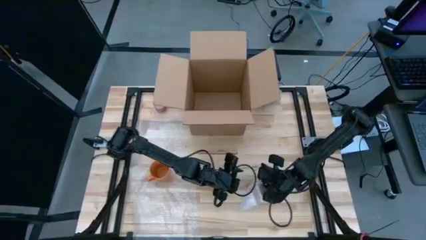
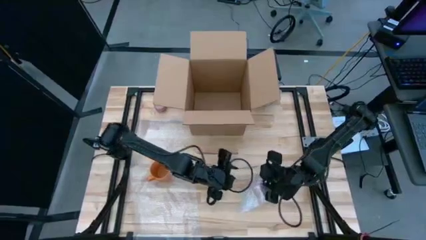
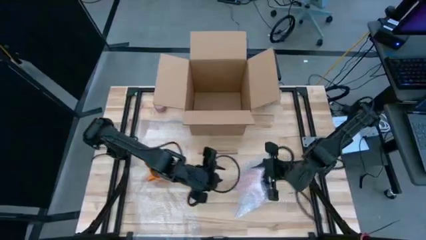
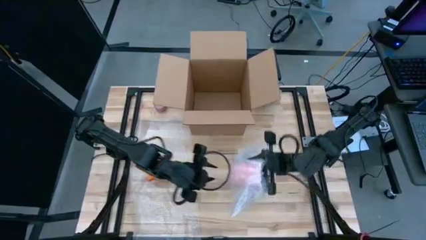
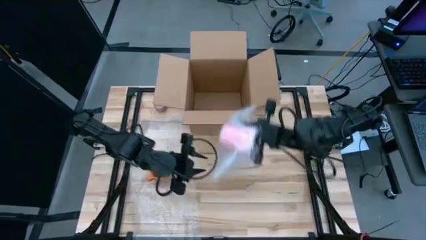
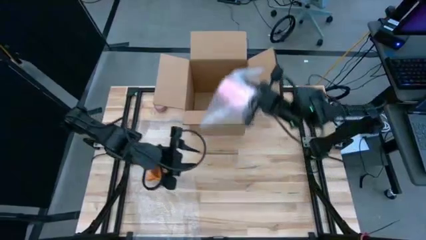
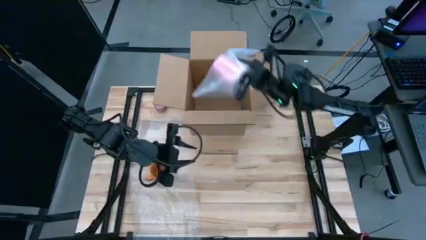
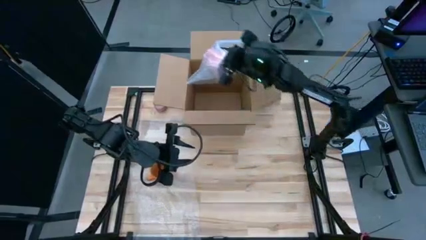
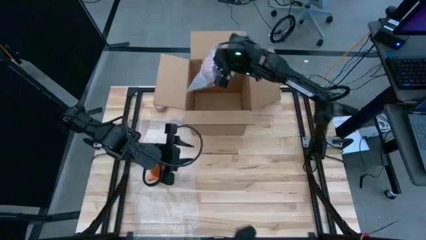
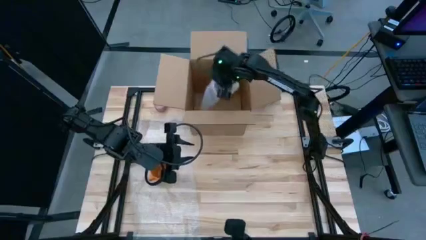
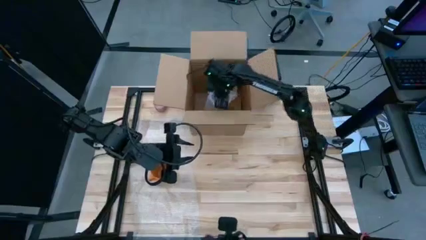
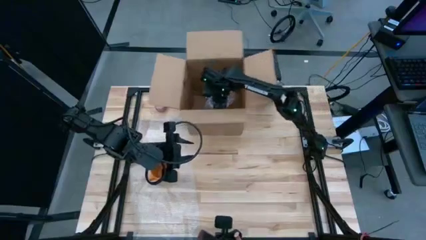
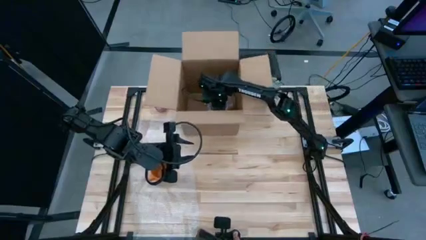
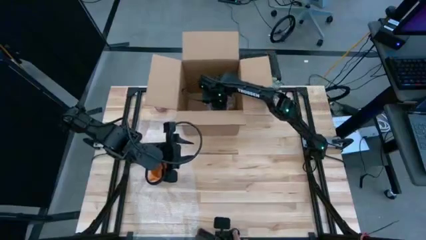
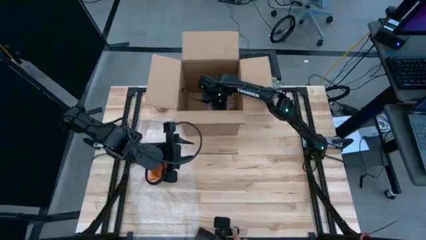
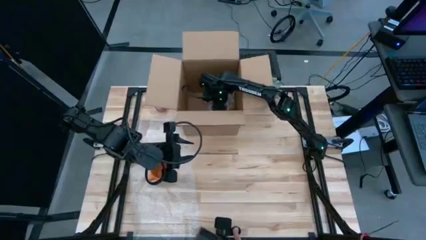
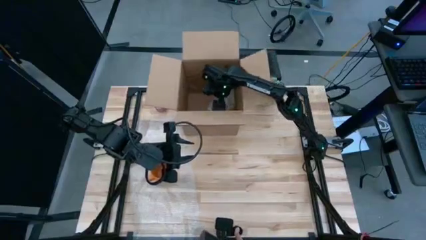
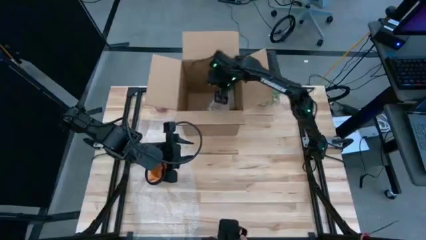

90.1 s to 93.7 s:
Task: wrap mug
Put the wrapped pink cup into the box

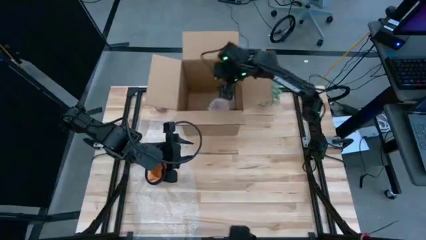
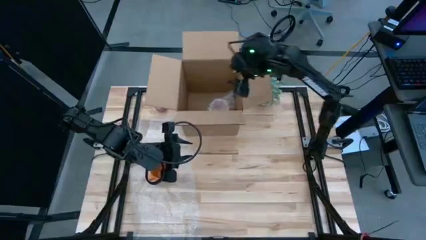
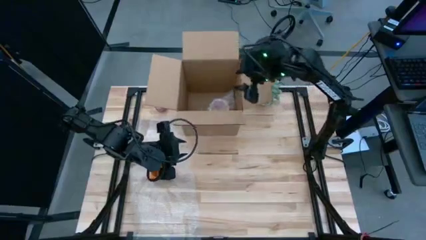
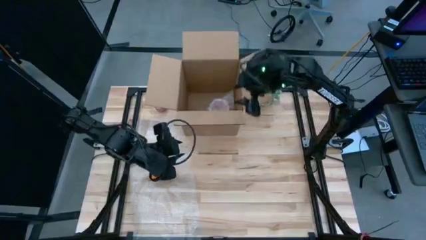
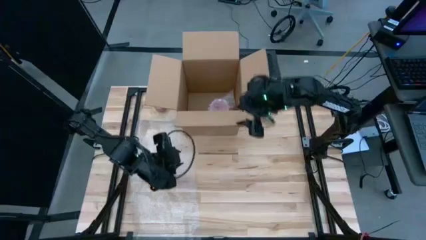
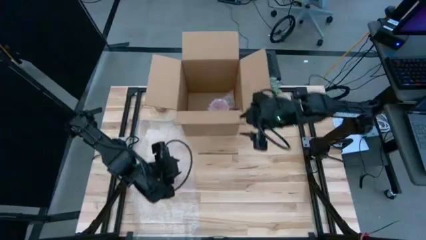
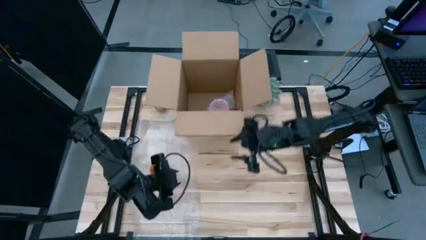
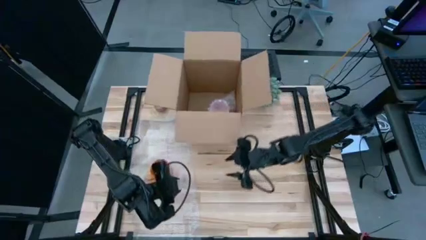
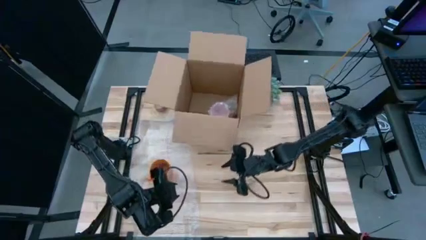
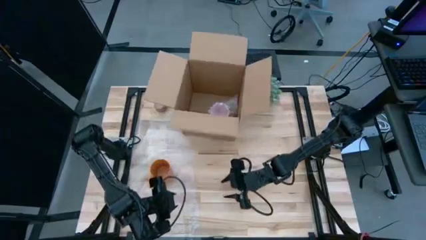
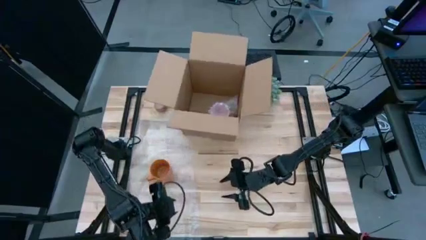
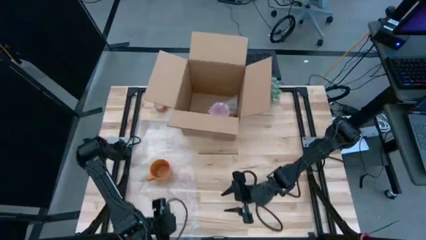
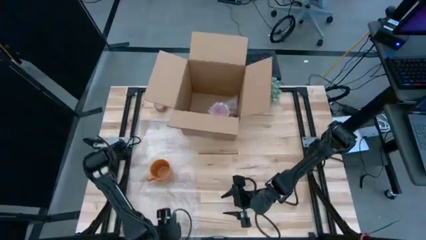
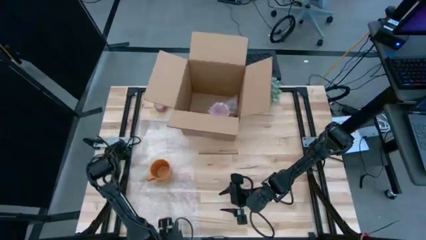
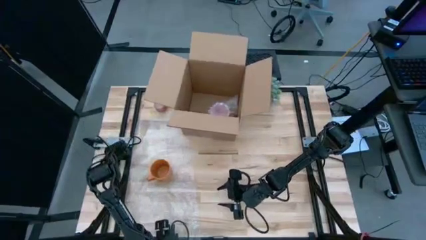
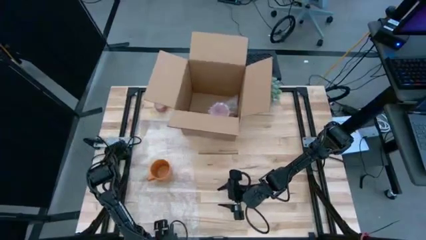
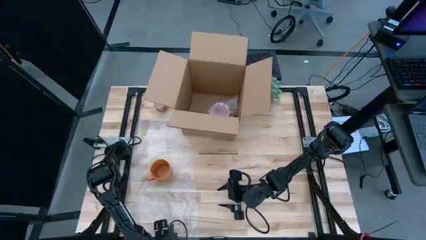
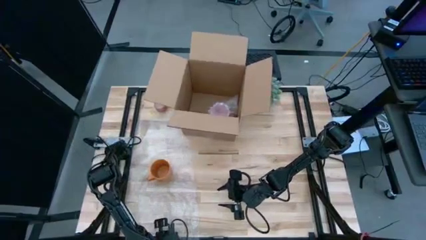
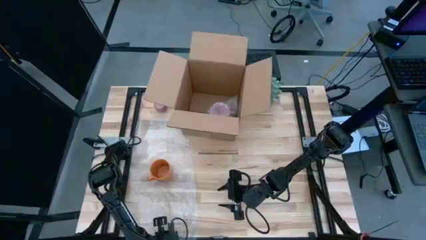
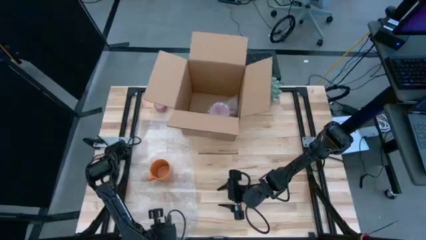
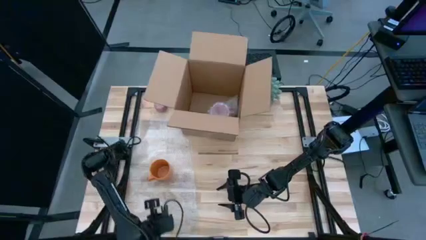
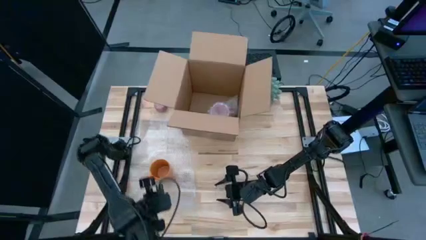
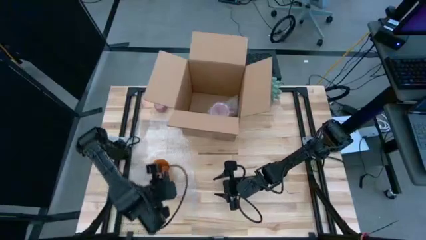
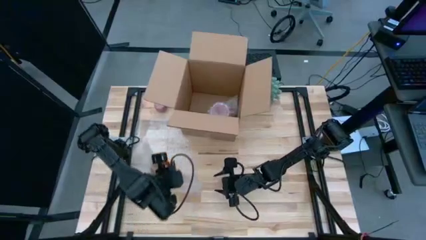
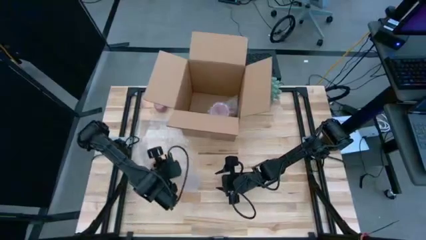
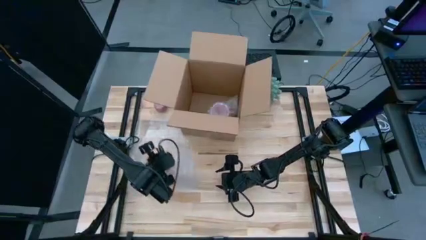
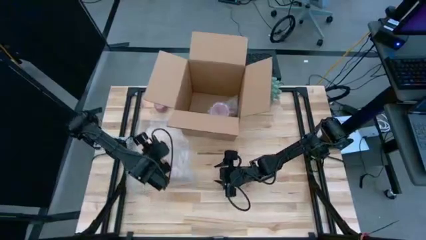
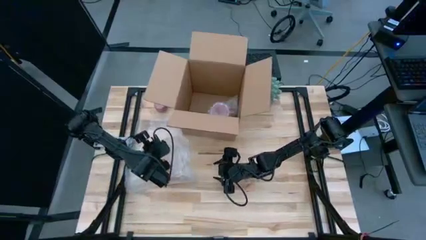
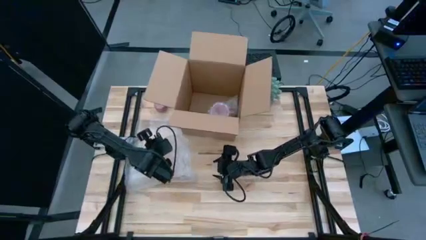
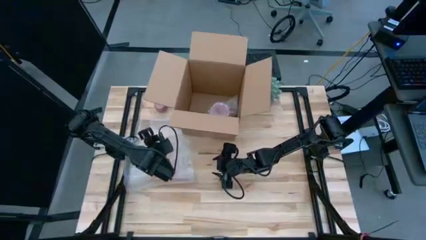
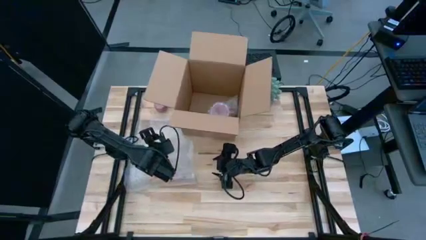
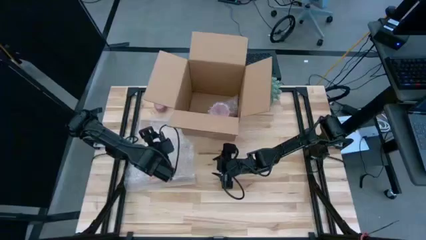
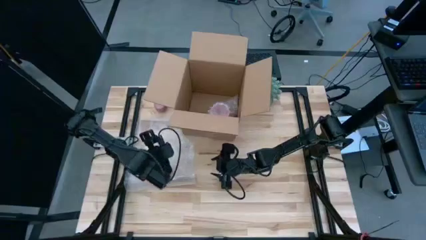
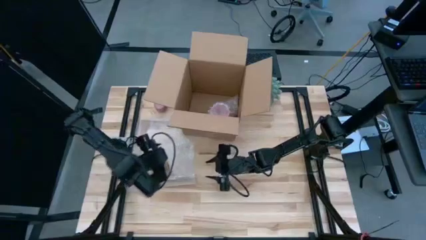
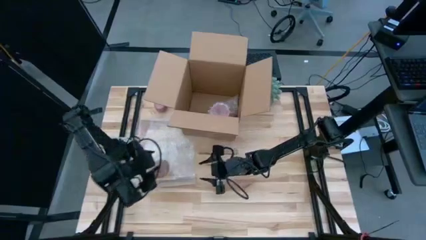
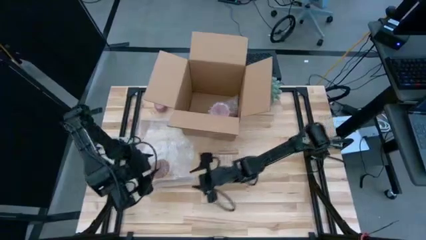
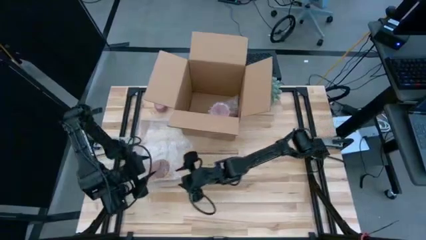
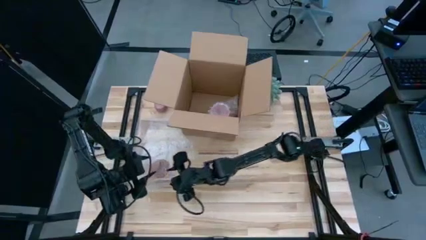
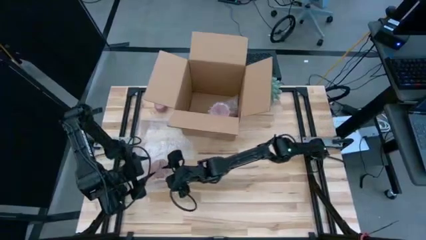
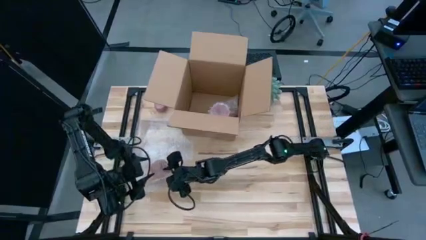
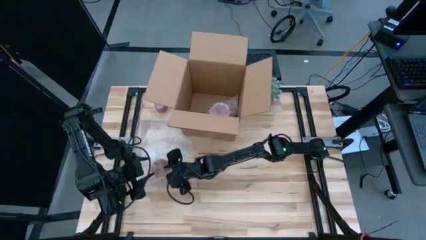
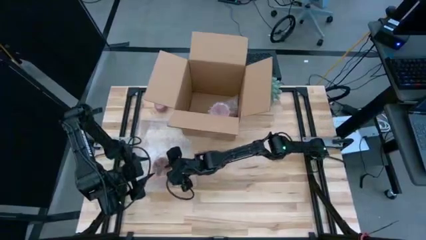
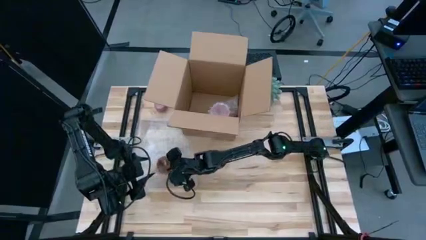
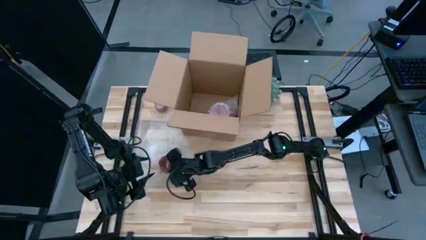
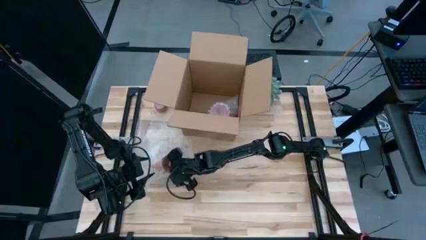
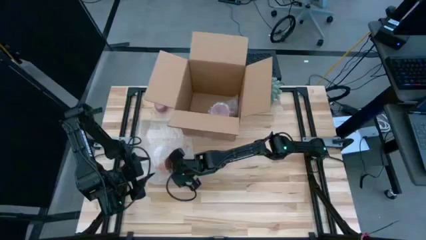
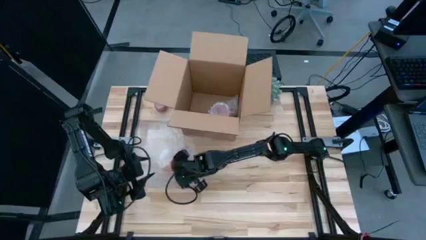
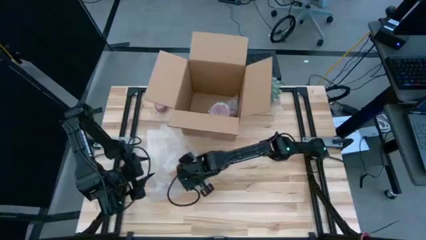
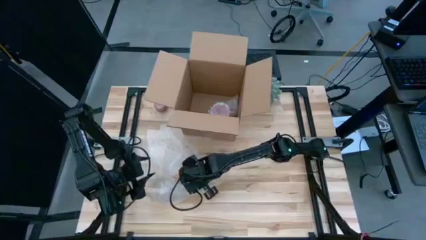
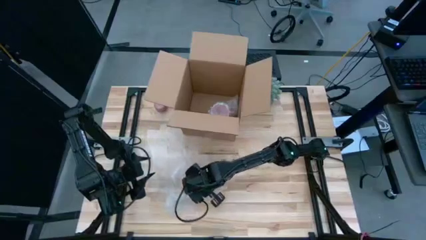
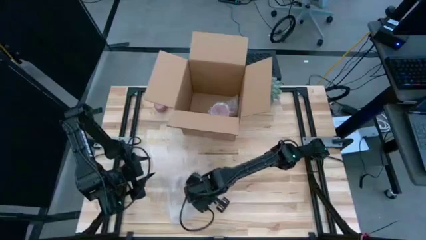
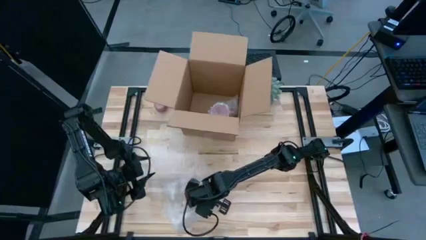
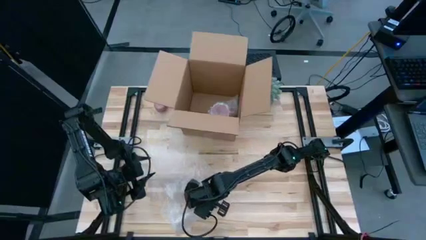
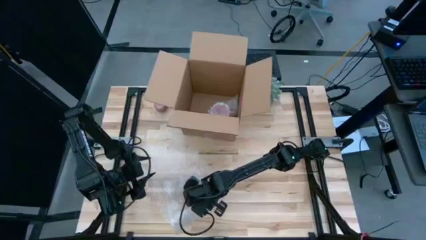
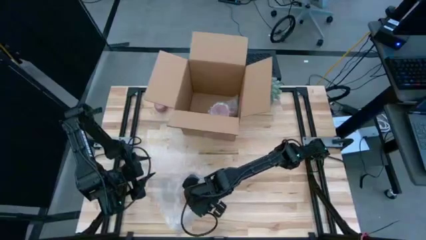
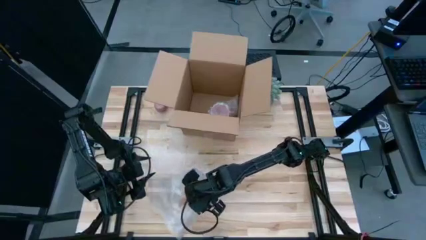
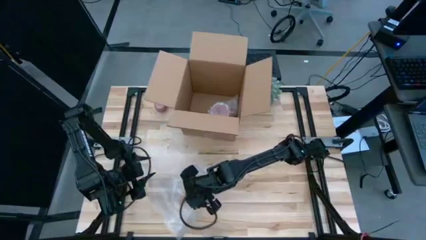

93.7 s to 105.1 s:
Move the bubble wrap with the orange cup closer to the center

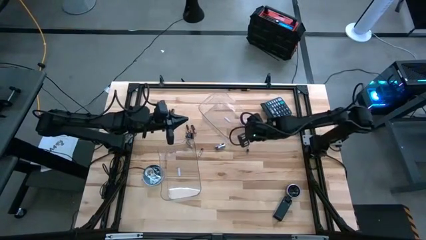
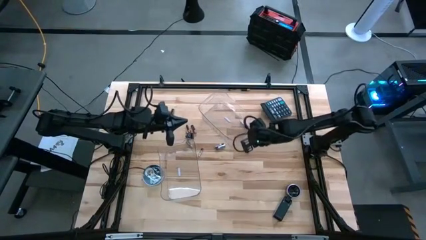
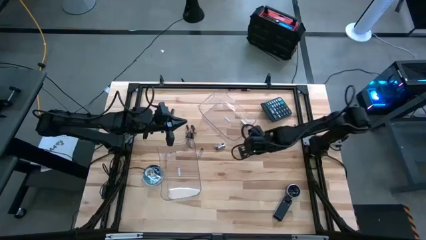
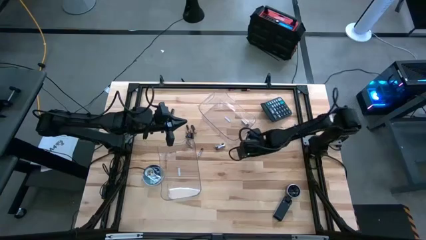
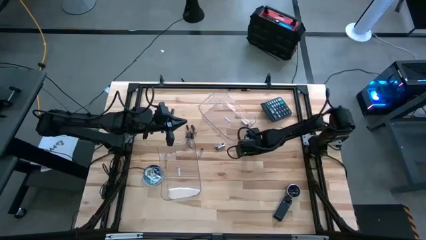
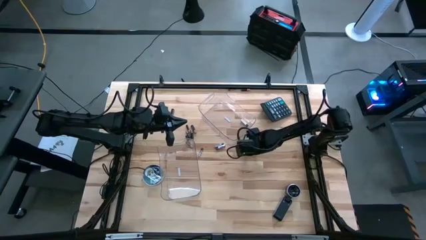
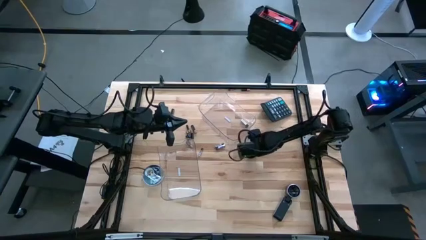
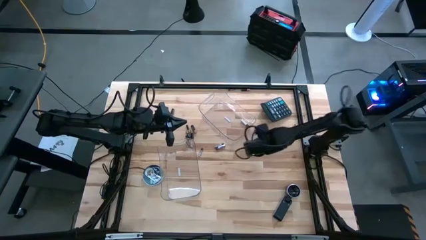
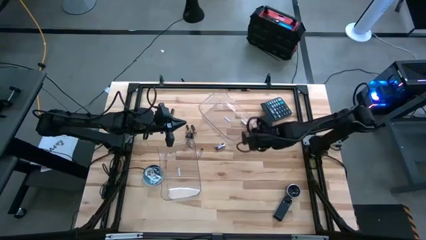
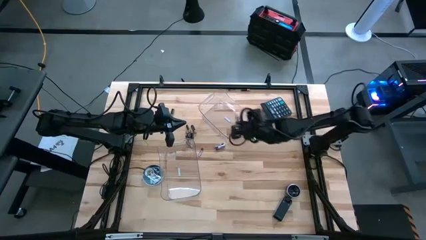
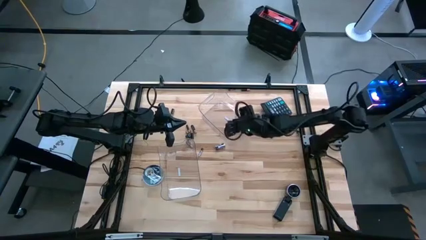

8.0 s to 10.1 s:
Task: Sort batteries
Put the silver battery into the top transparent bin

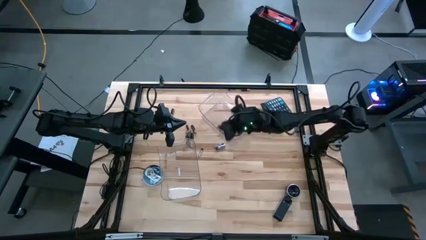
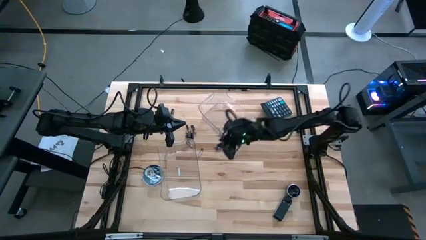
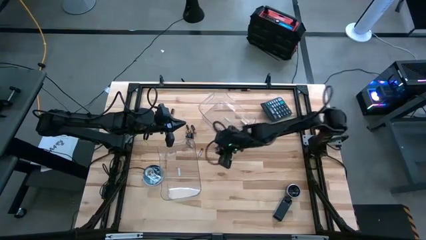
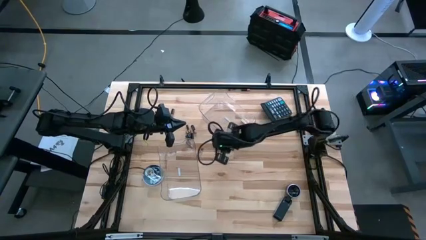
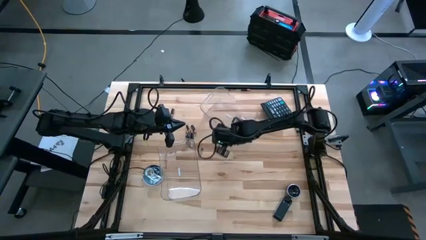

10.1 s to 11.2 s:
Adjust the top transparent bin
